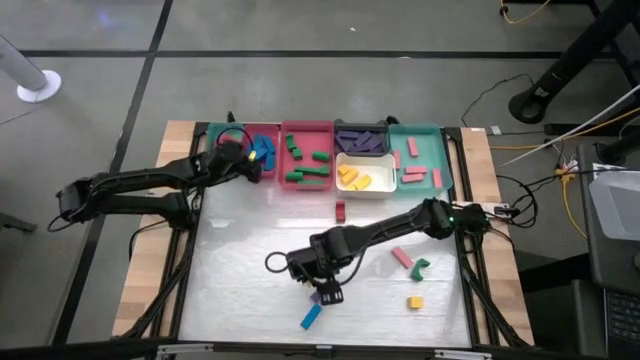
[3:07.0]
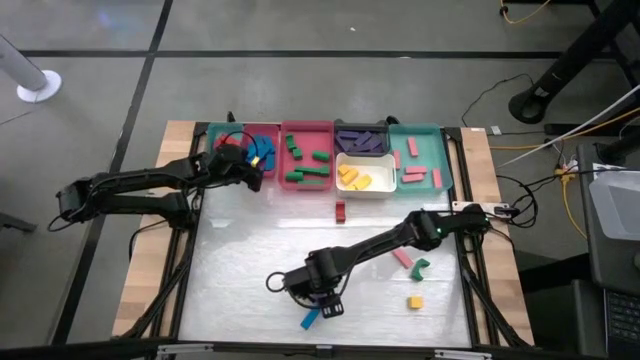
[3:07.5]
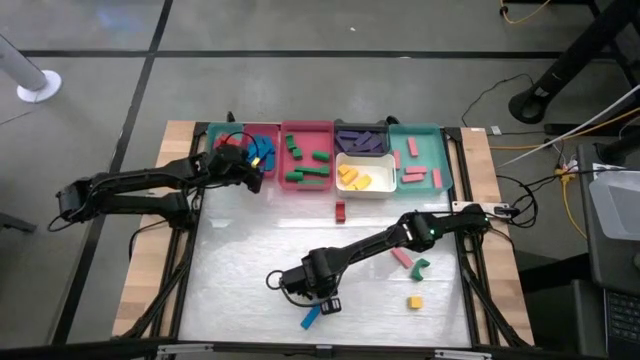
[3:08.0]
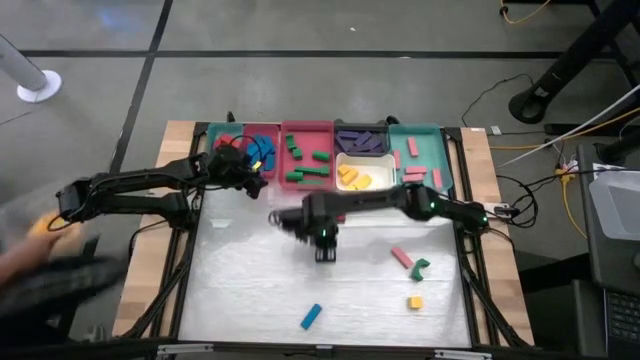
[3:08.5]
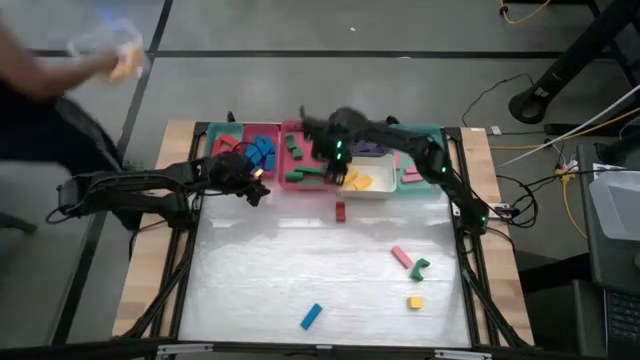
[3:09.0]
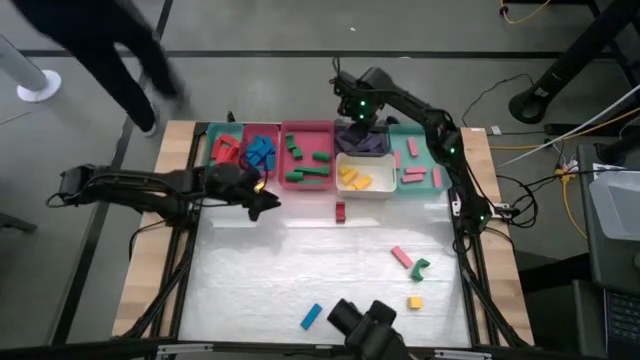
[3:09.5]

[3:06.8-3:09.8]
Task: Sort blocks
Put the violet block into the black bin

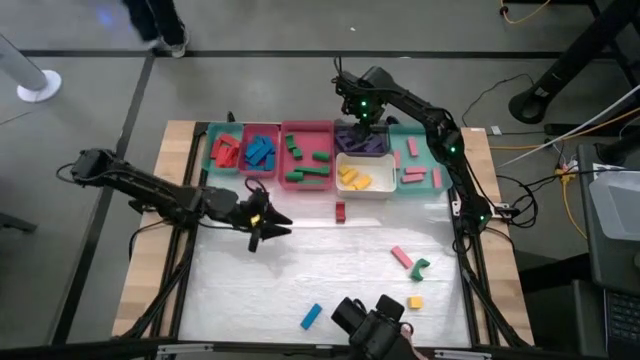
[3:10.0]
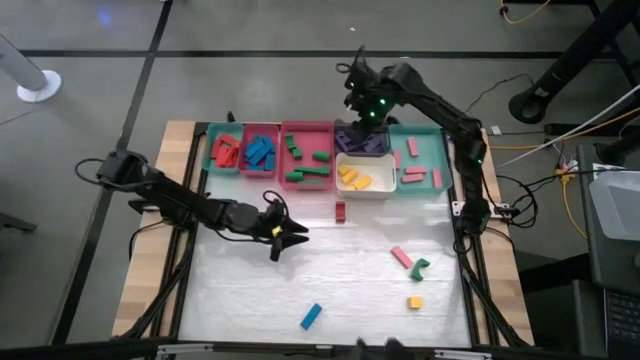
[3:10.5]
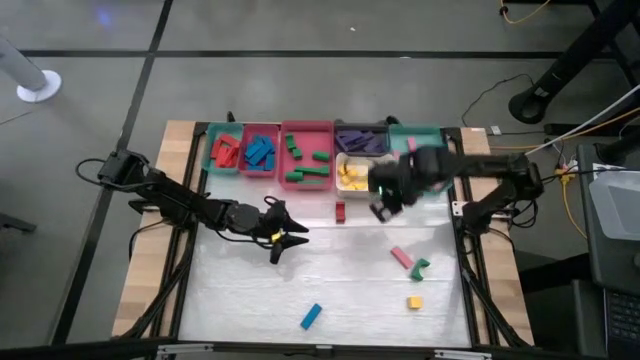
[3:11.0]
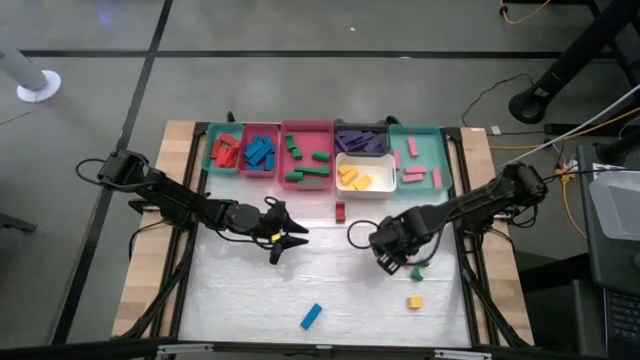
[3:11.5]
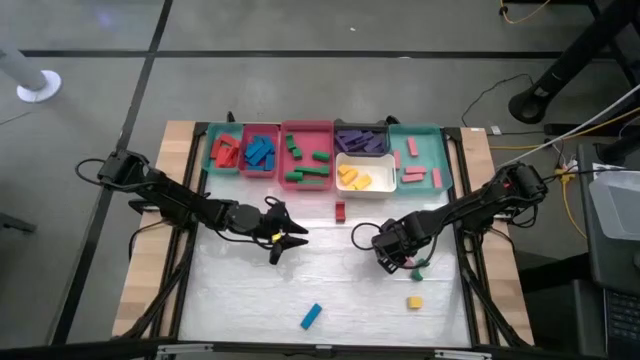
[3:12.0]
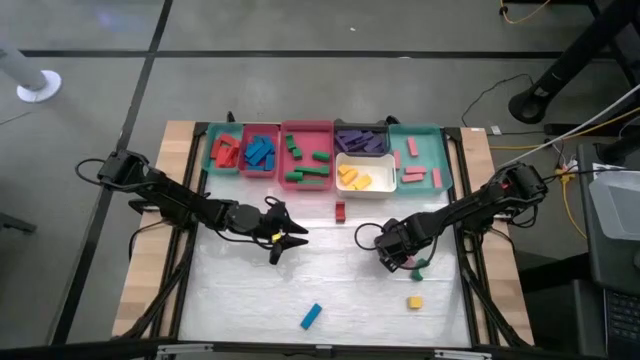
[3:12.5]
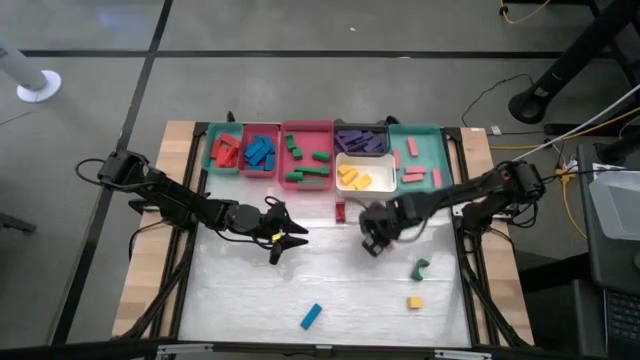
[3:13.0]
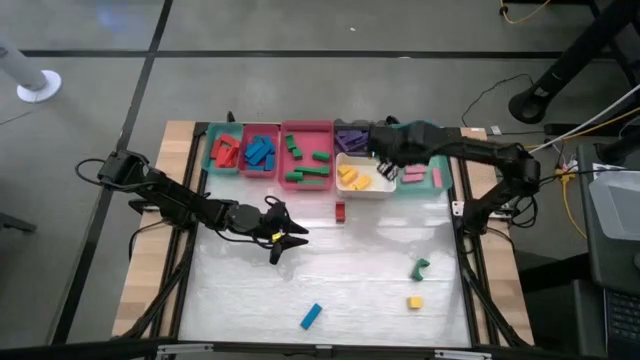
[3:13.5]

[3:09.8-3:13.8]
Put the pink block into the right green bin

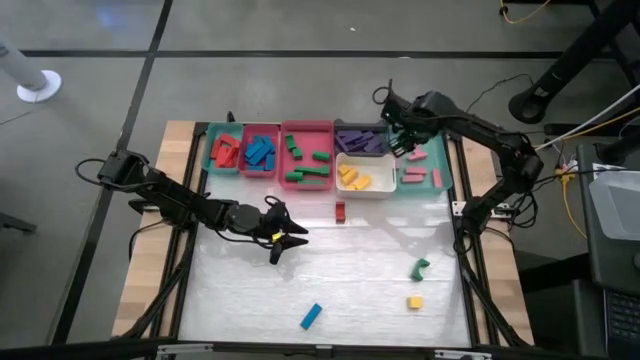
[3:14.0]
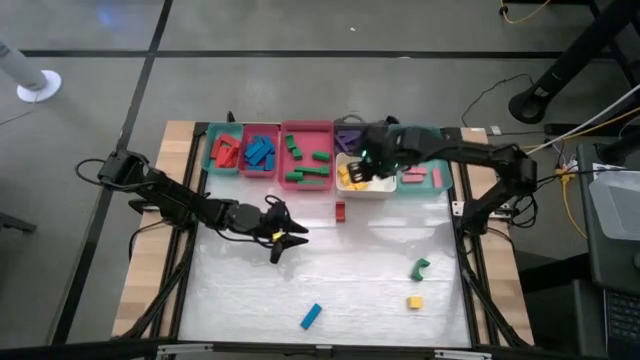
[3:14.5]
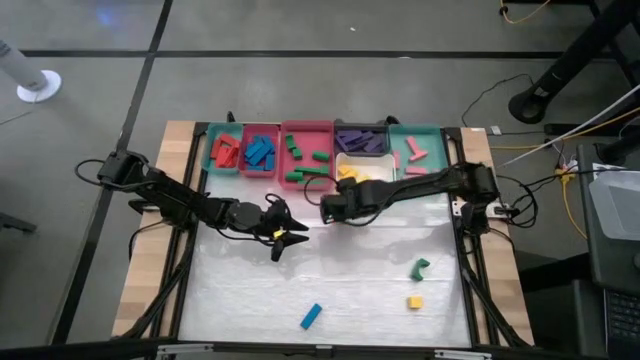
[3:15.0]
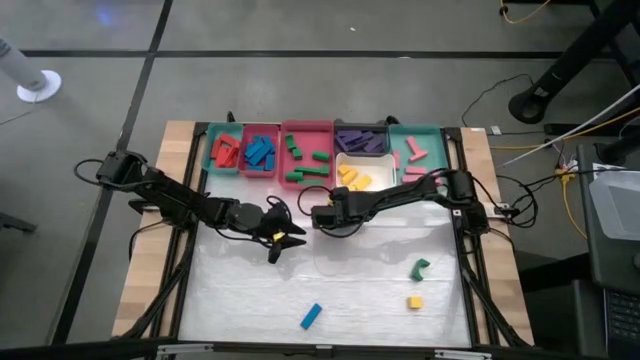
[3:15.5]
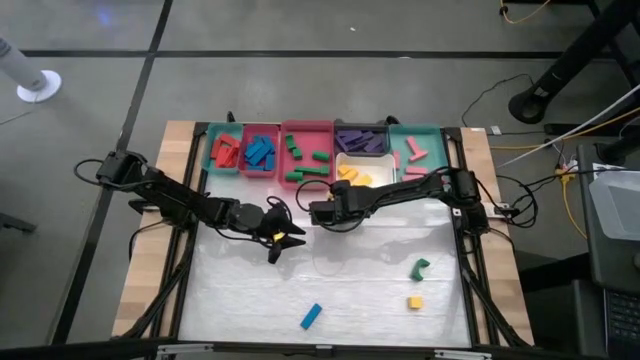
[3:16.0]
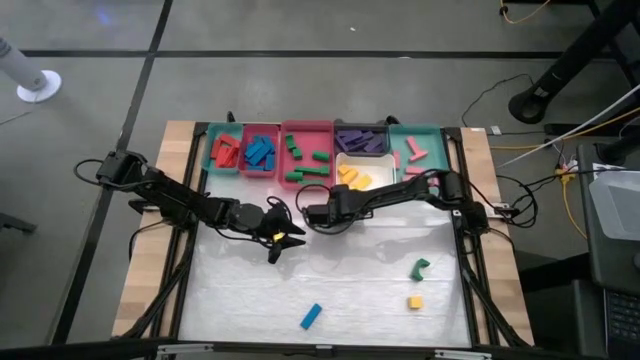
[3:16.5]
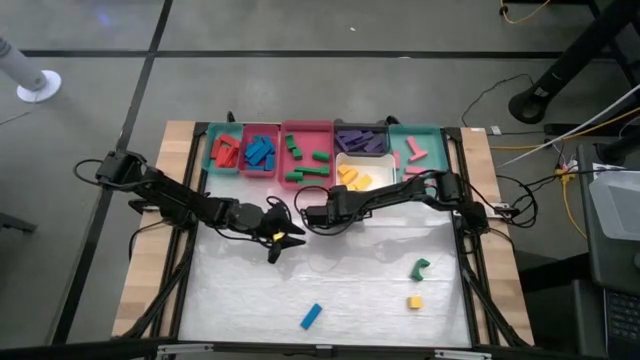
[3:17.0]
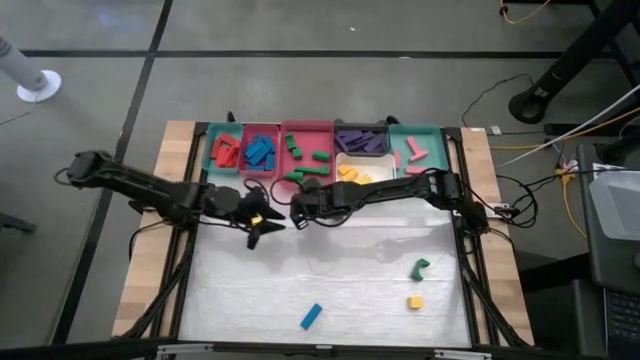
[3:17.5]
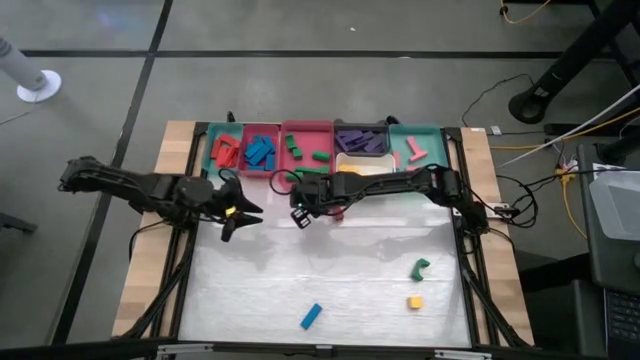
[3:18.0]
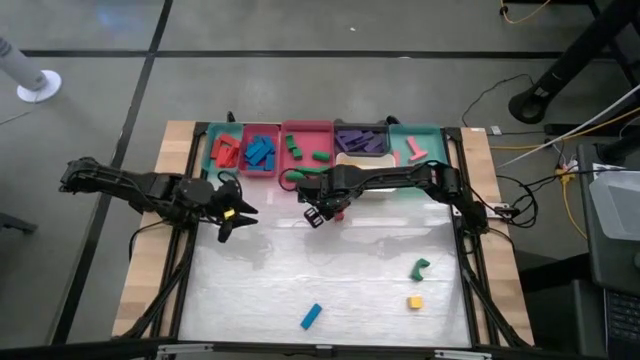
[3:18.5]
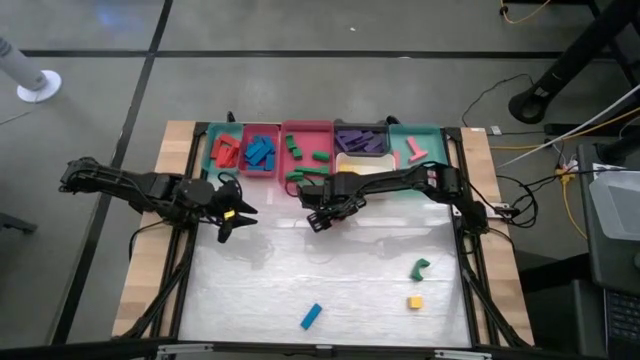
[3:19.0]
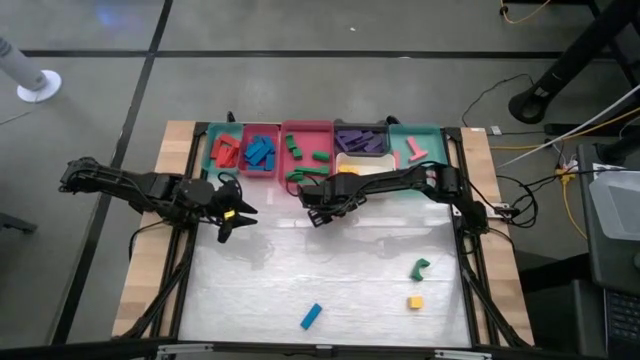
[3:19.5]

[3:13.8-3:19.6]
Put the red block into the left green bin

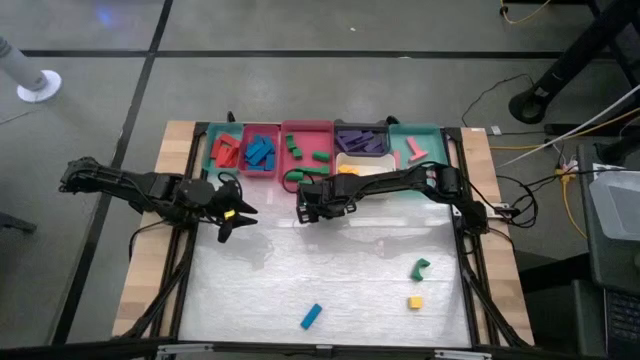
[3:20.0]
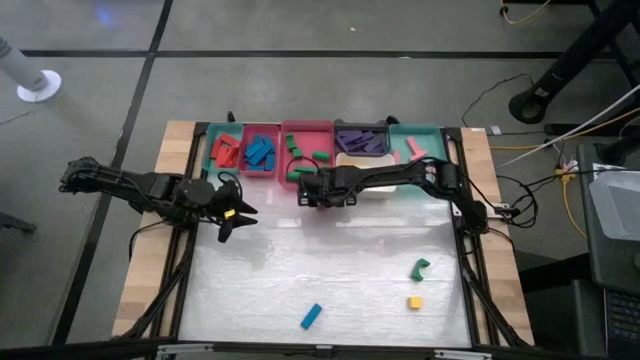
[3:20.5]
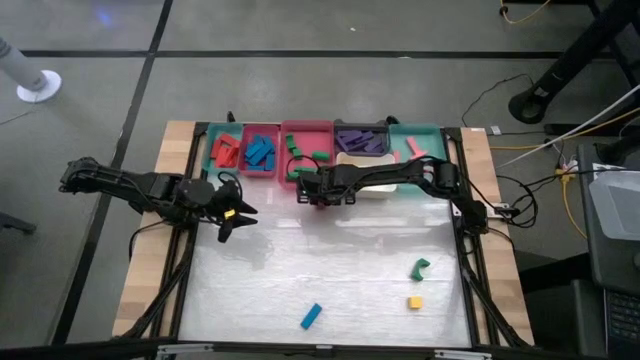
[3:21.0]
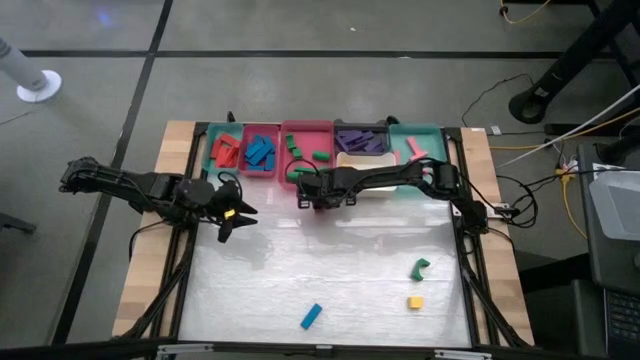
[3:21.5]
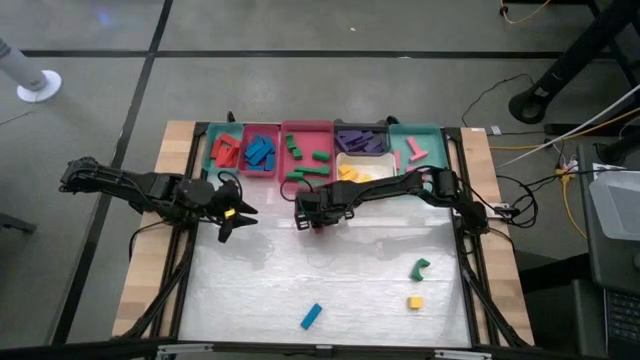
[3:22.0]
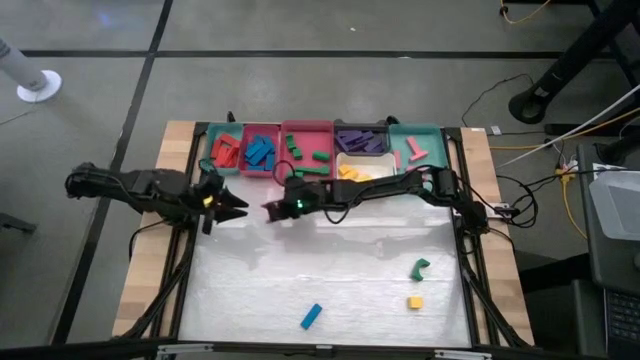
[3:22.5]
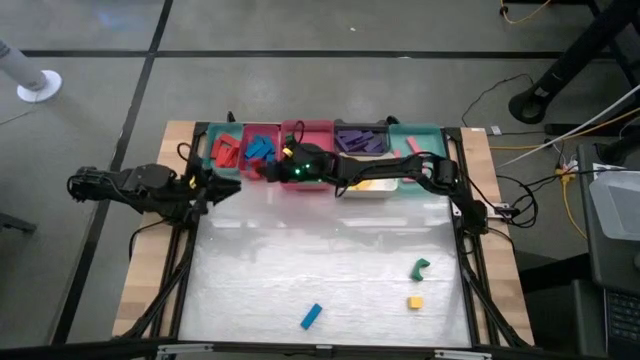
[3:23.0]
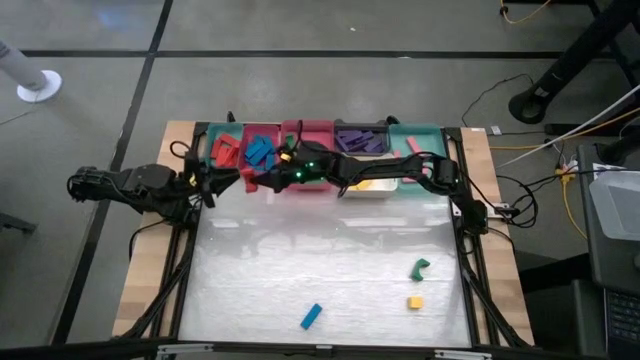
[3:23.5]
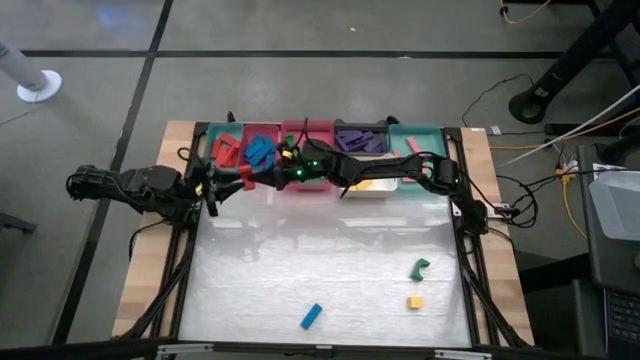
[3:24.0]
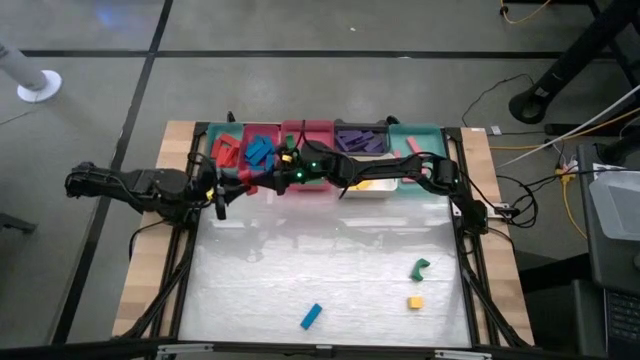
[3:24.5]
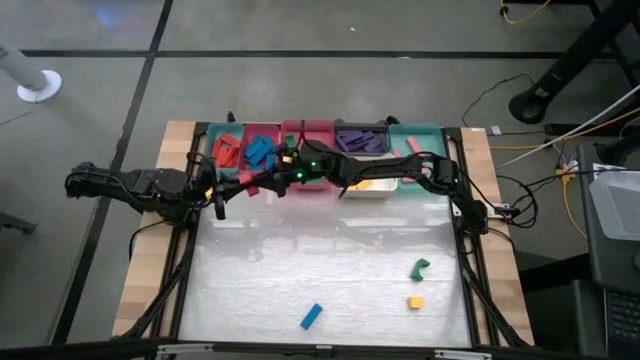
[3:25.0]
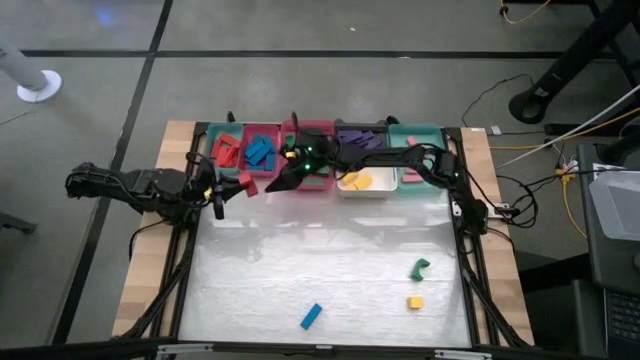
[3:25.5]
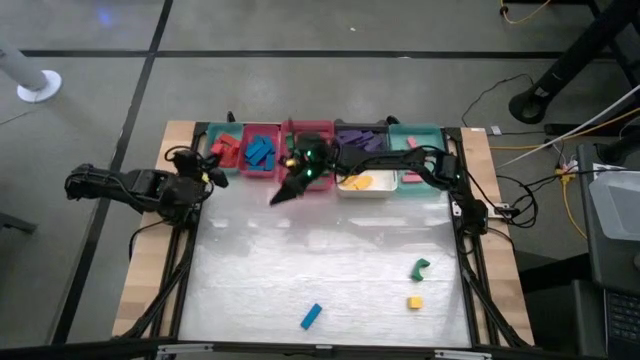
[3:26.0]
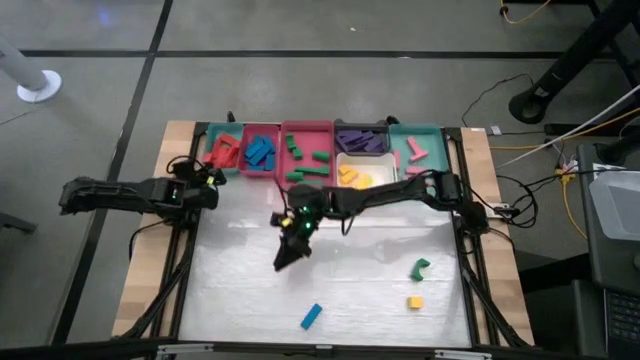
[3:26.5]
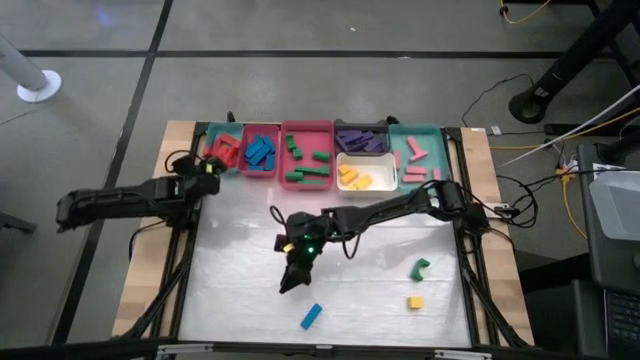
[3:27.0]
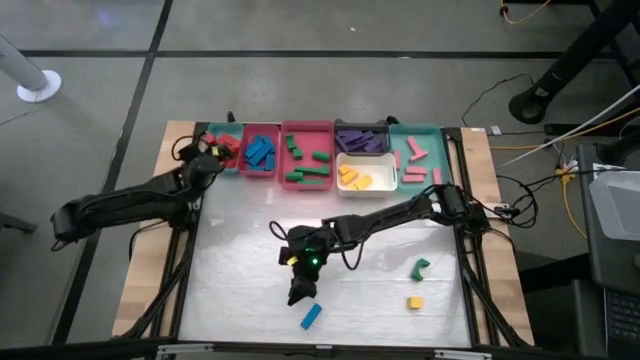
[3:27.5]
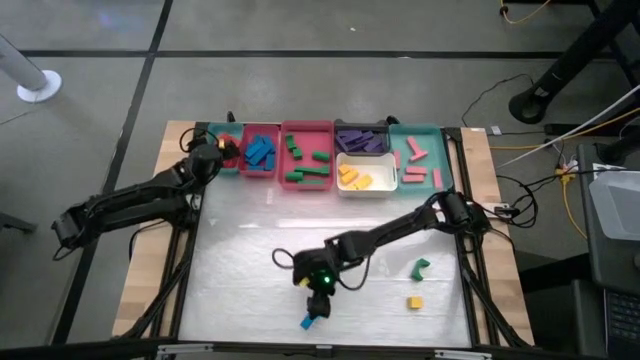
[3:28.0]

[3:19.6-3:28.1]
Put the red block into the left green bin
